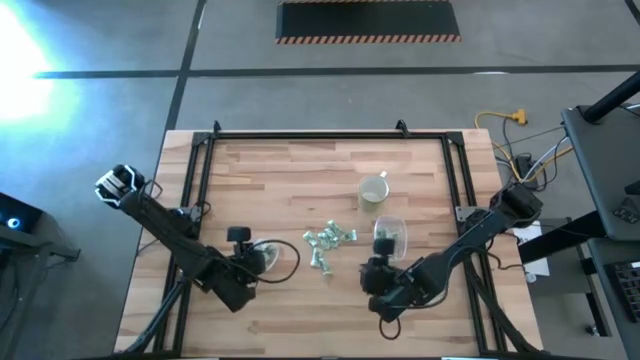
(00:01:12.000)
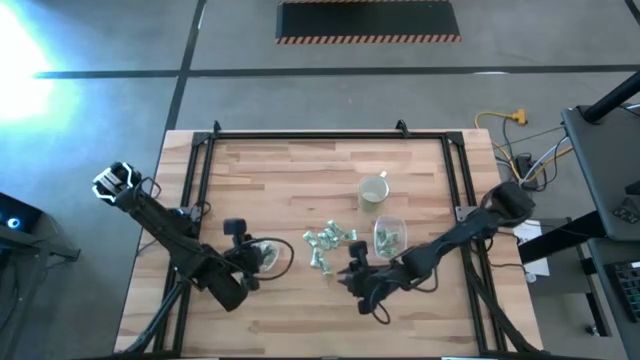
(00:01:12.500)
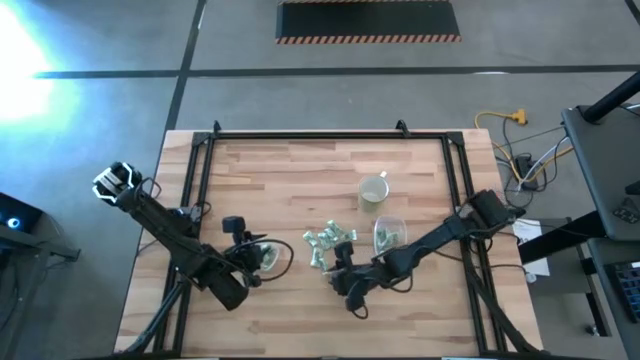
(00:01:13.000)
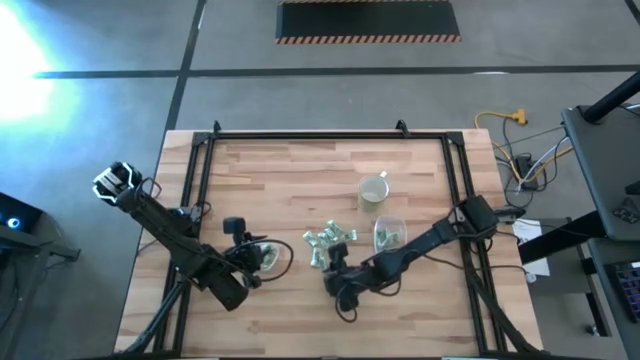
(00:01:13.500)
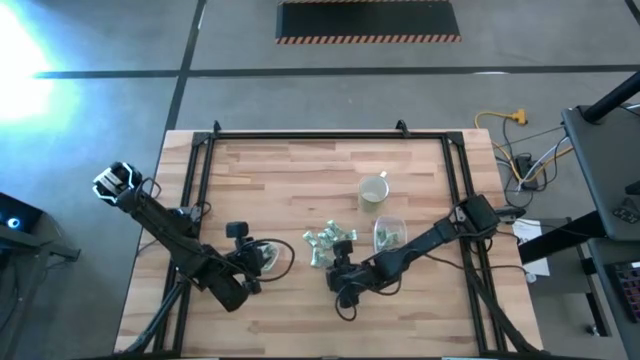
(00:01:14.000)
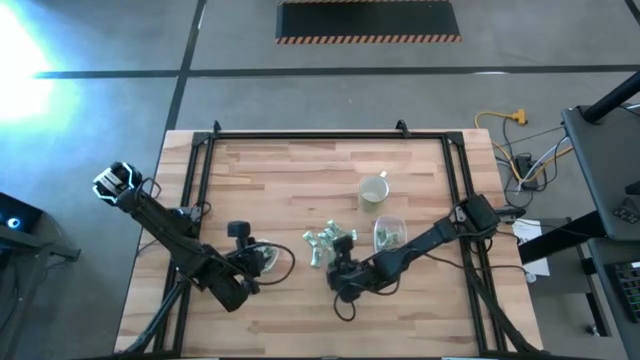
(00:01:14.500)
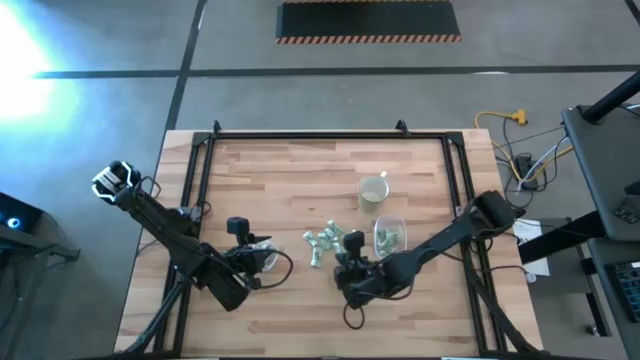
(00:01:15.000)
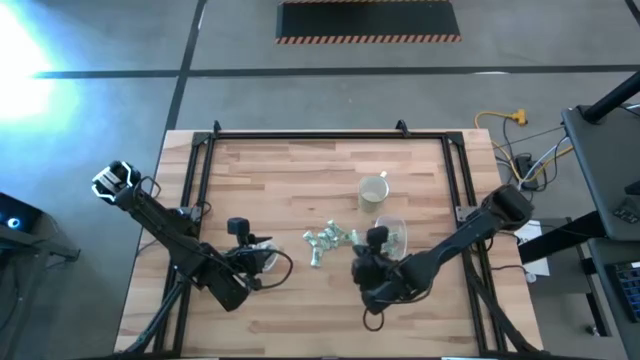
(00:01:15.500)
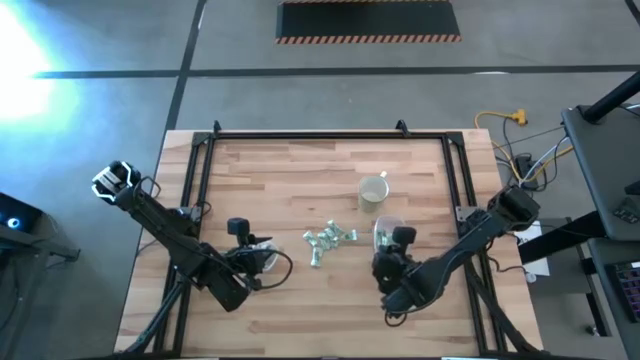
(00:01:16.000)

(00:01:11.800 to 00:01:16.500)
Task: Pick and place Stevia / Truvia into bins
Put the stevia packet into the right transparent container

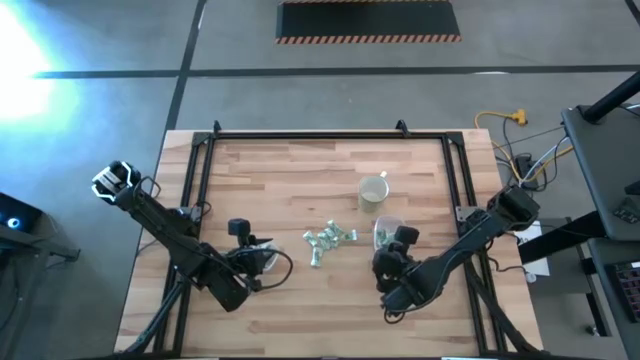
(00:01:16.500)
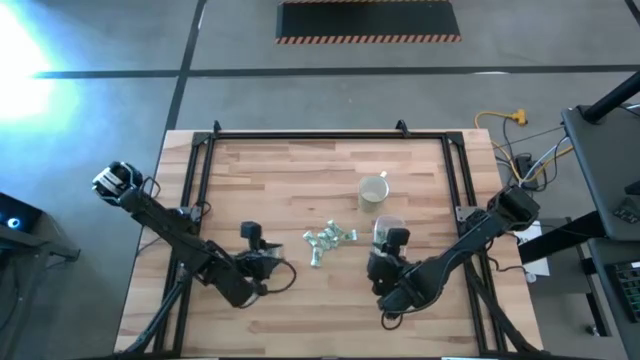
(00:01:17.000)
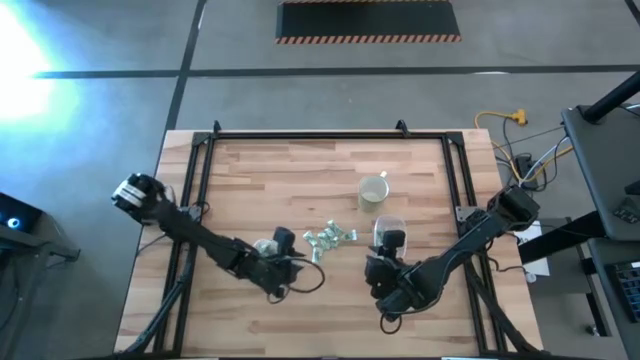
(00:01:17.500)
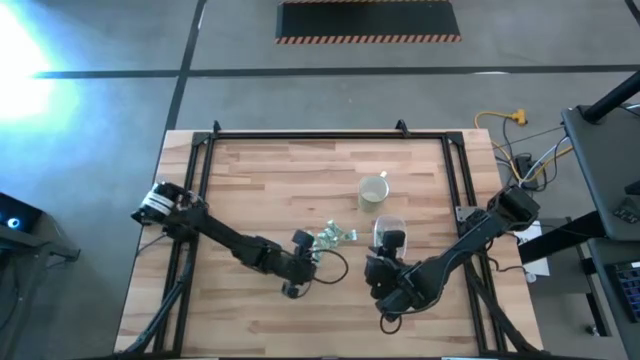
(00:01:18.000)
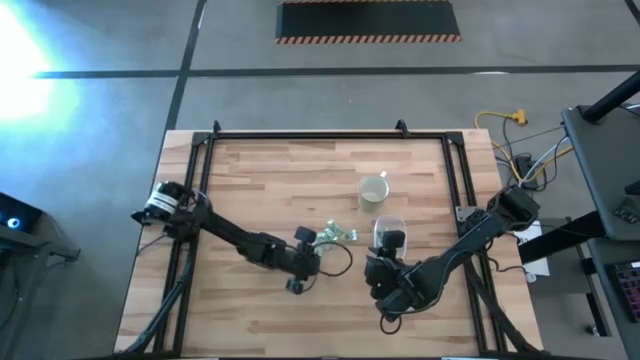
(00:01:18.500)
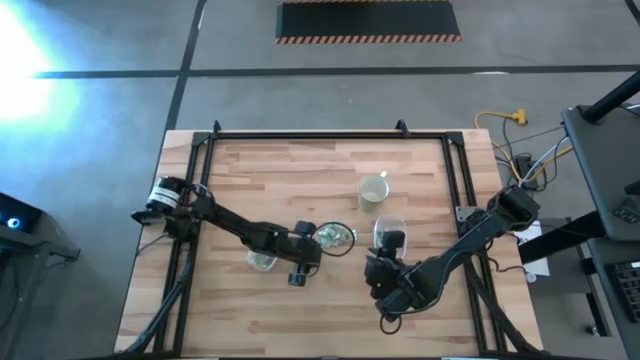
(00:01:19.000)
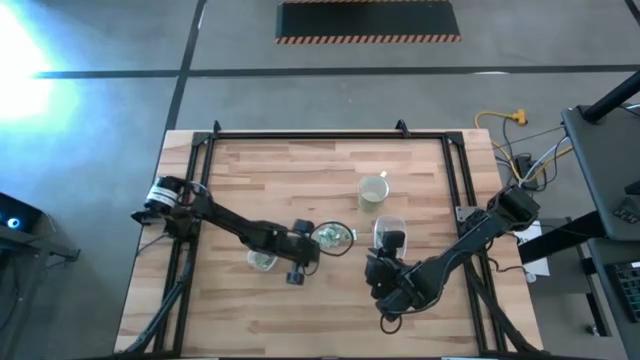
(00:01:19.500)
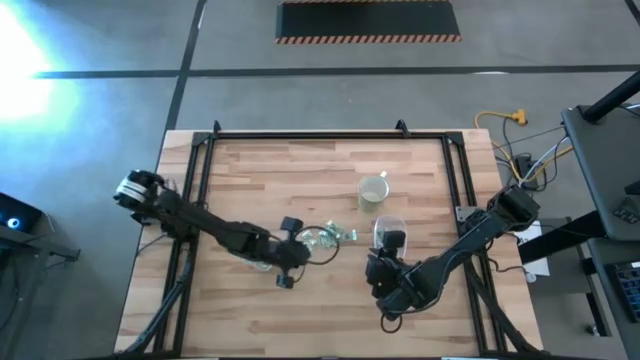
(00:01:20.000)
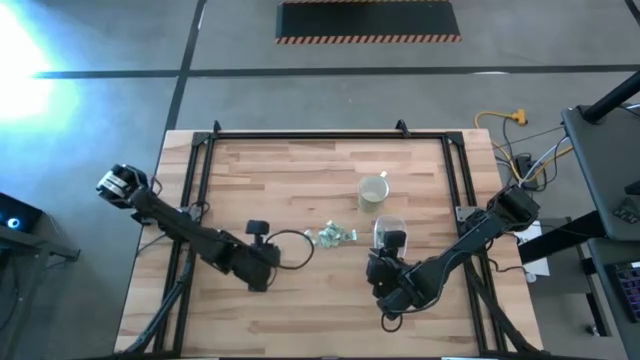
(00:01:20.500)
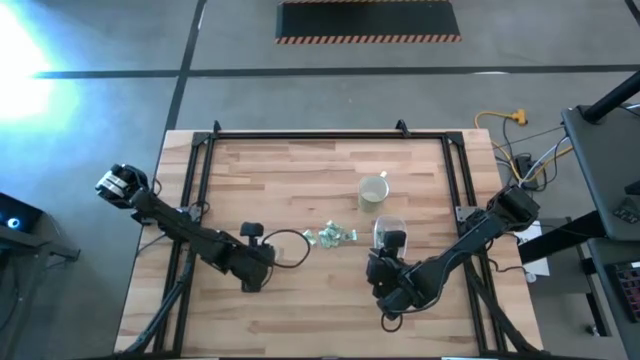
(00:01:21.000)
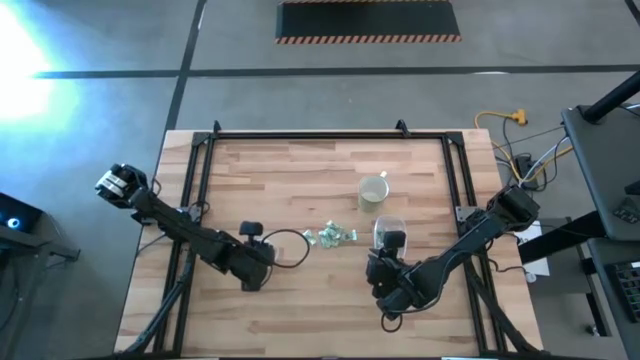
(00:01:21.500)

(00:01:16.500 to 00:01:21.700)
Put the stevia packet into the left transparent container

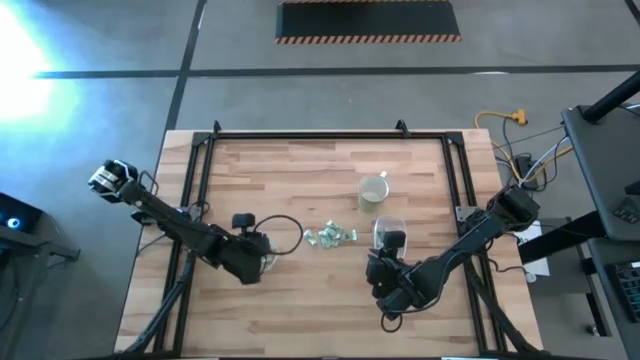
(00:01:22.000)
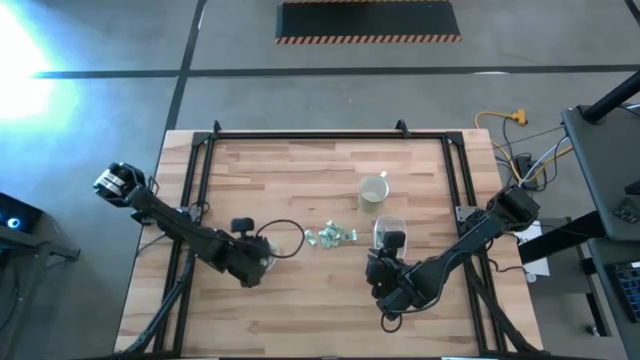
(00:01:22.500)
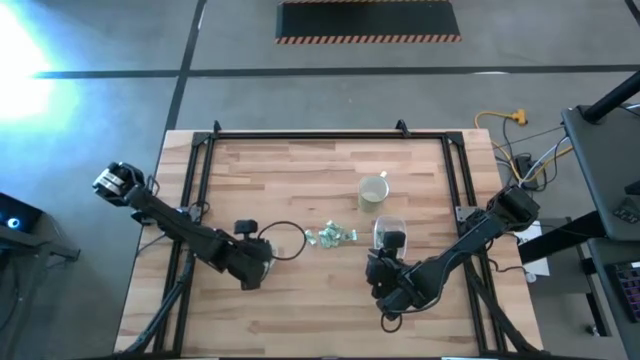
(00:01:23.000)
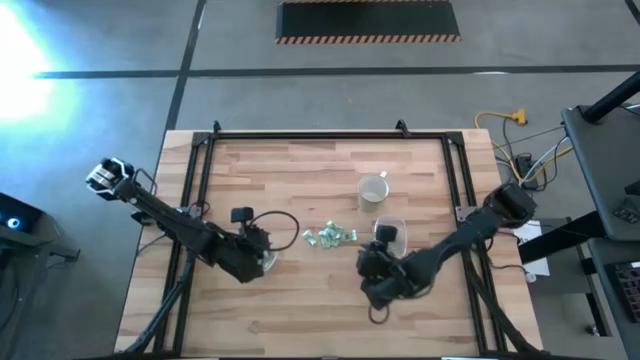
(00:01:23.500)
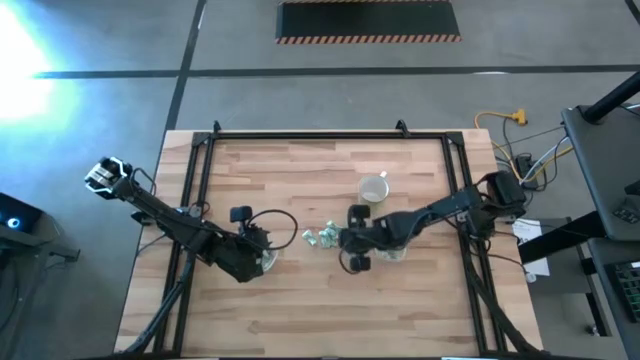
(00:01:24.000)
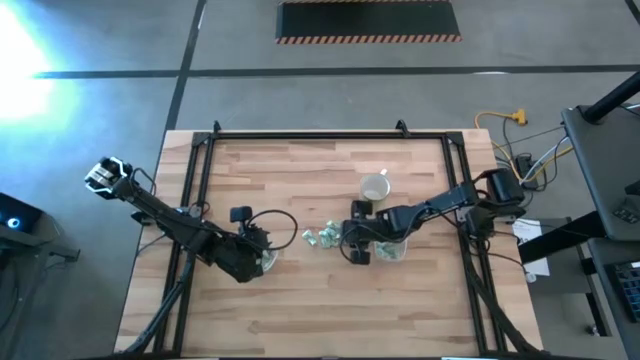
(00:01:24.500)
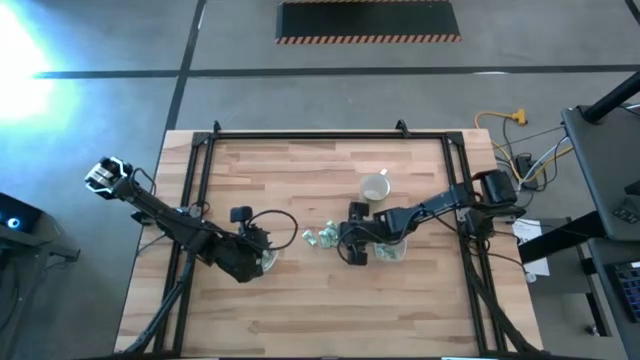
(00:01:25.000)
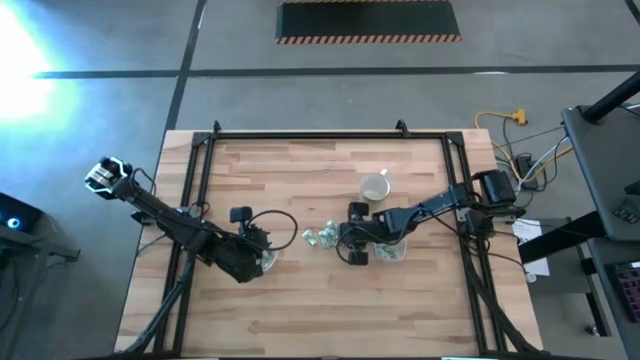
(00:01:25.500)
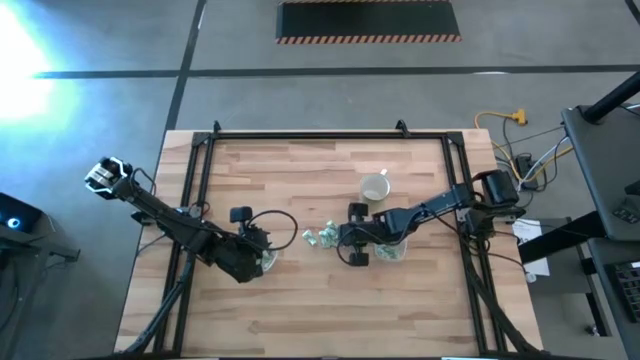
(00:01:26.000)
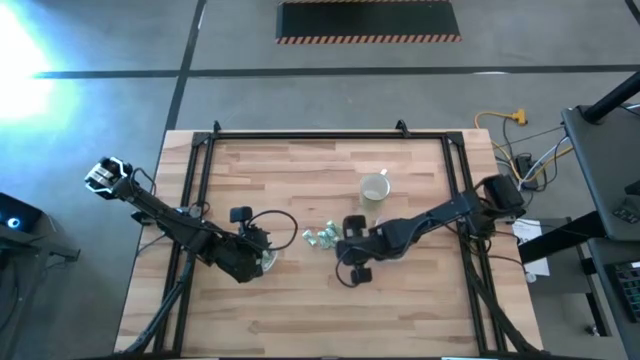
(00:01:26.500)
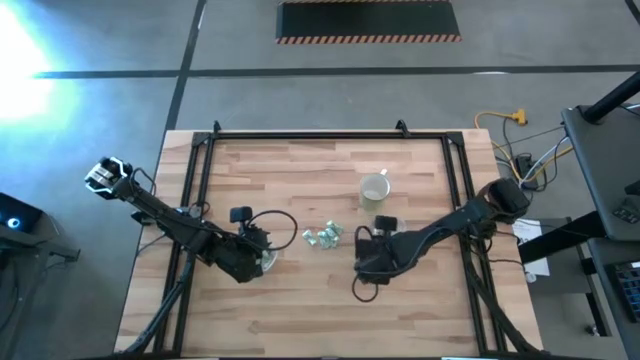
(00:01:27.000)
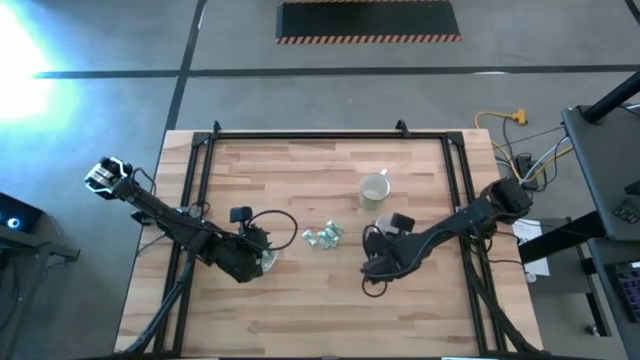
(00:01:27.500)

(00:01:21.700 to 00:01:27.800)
Put the stevia packet into the right transparent container

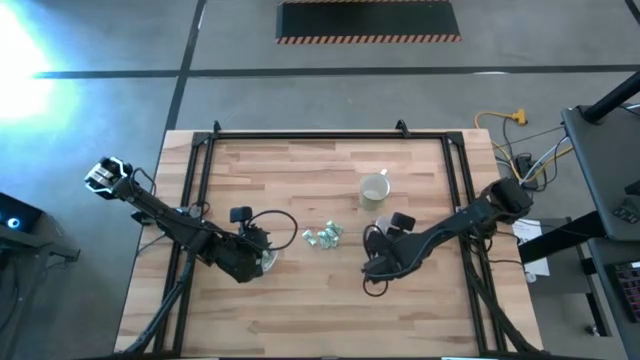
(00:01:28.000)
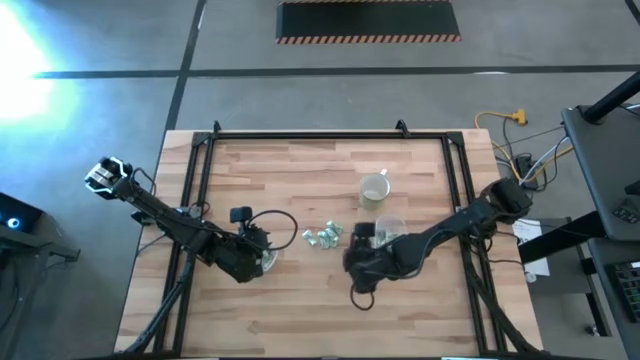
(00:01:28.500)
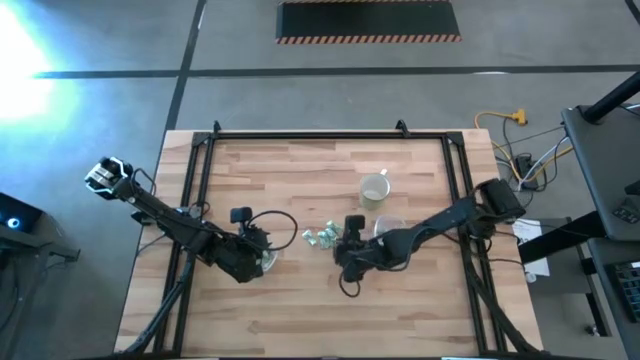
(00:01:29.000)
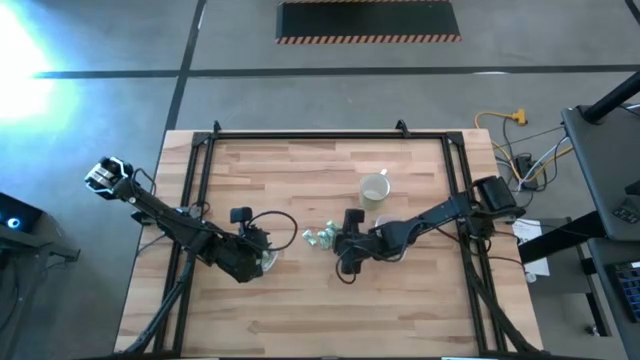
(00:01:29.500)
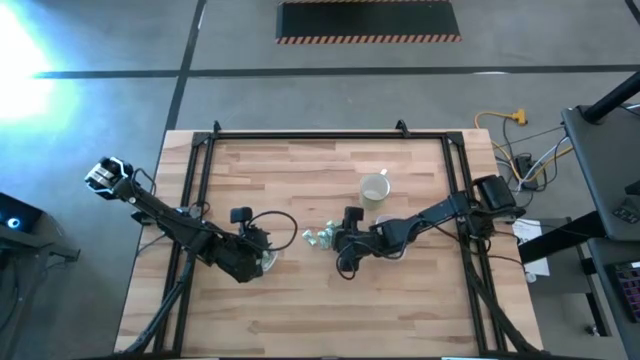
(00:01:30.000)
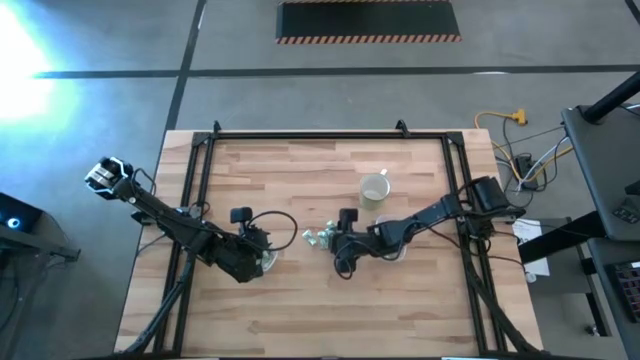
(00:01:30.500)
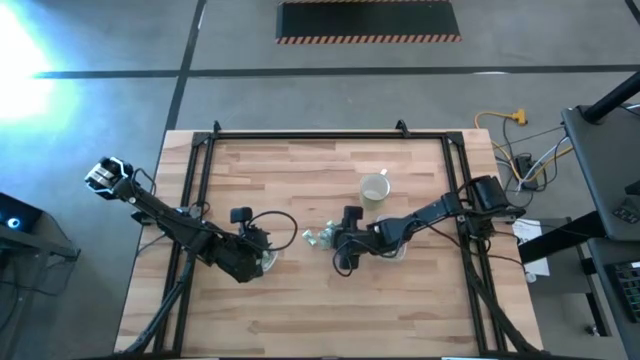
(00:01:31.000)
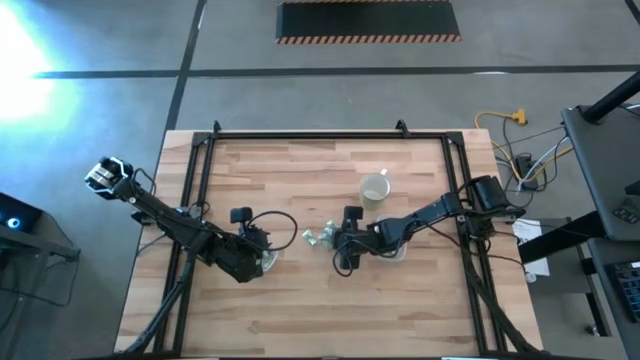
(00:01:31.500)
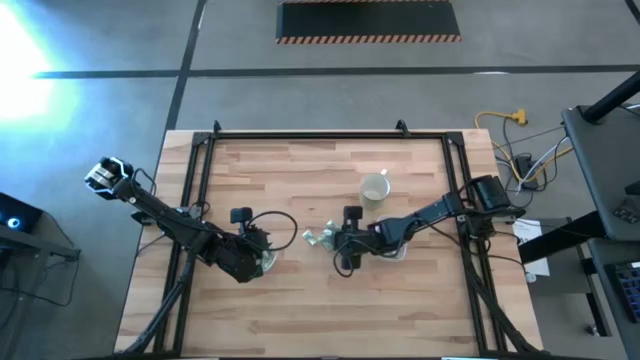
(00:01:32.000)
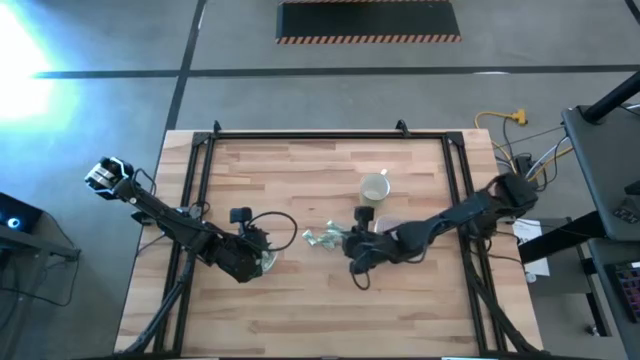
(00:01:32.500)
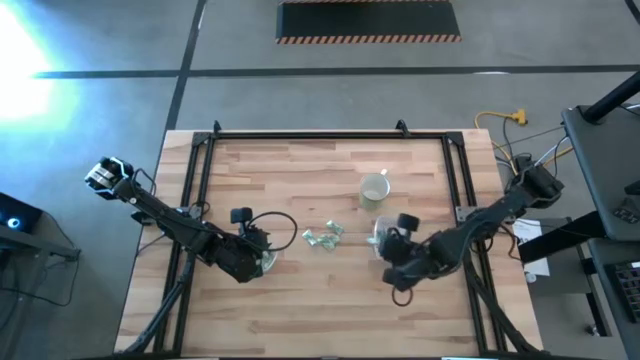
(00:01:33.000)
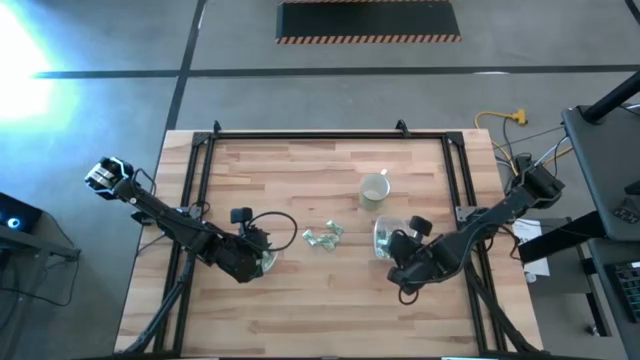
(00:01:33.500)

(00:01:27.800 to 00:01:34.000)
Put the stevia packet into the right transparent container
